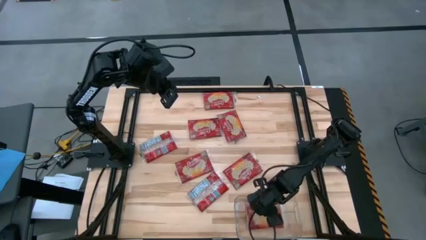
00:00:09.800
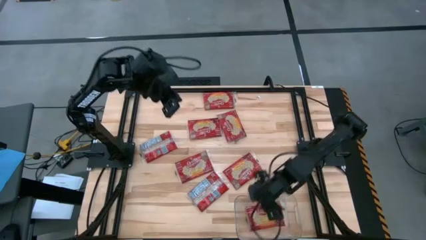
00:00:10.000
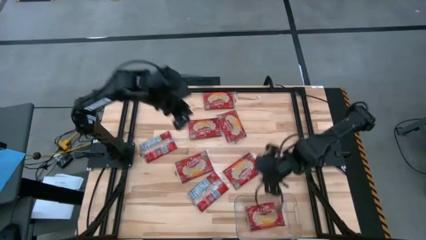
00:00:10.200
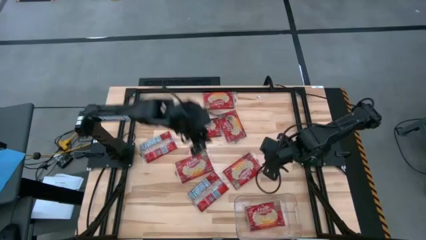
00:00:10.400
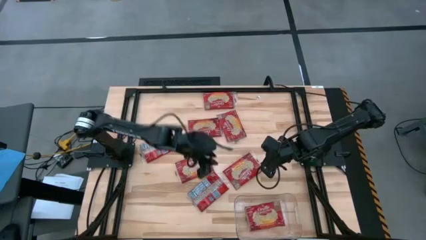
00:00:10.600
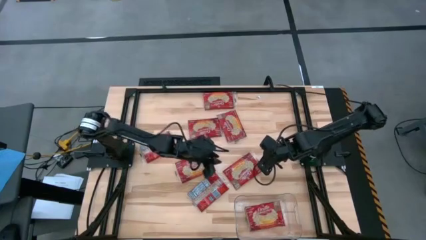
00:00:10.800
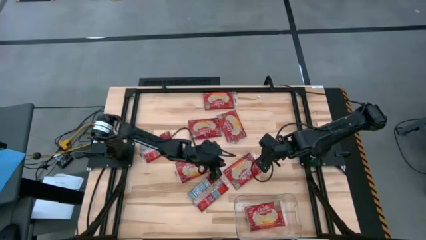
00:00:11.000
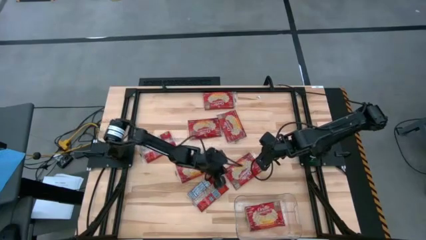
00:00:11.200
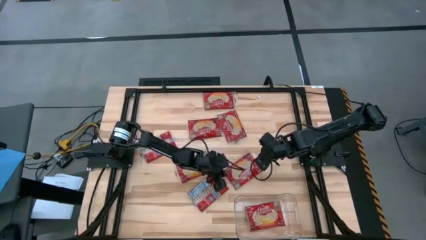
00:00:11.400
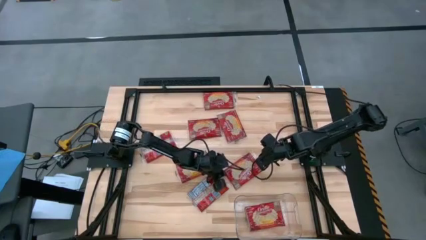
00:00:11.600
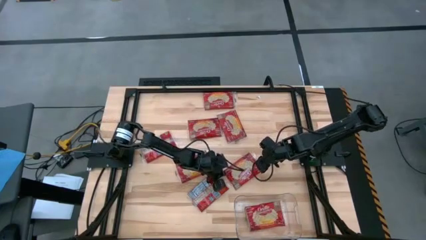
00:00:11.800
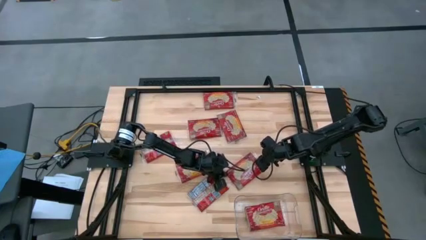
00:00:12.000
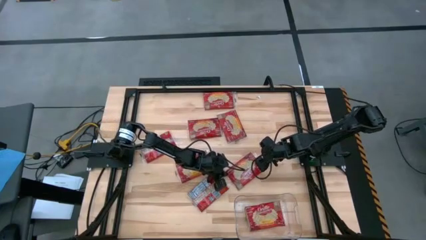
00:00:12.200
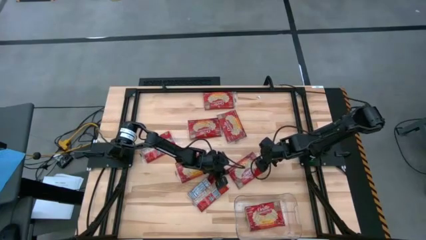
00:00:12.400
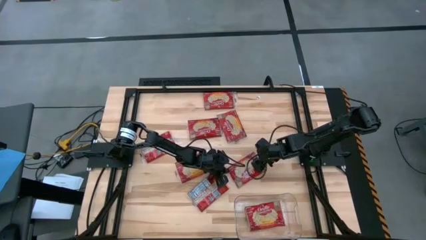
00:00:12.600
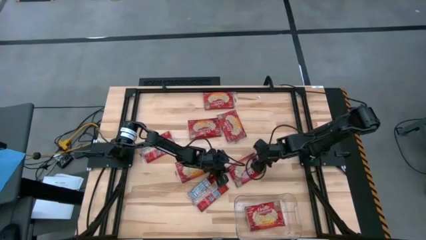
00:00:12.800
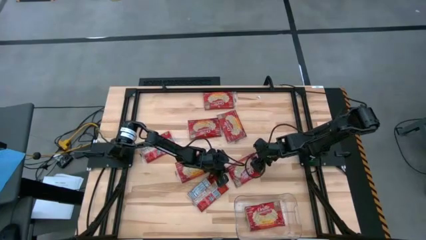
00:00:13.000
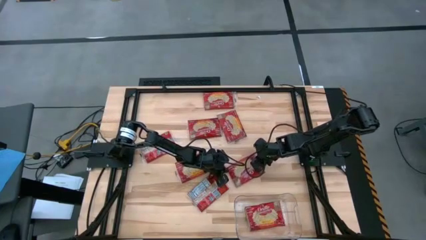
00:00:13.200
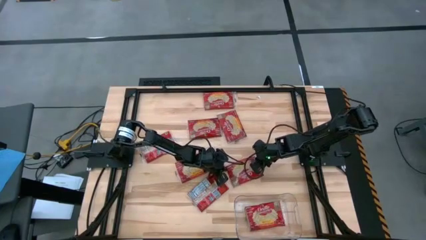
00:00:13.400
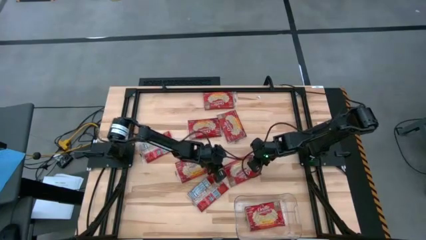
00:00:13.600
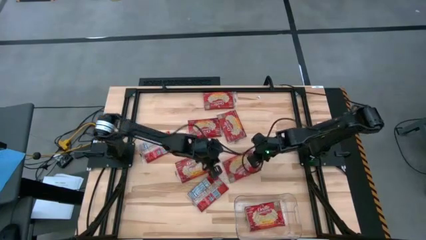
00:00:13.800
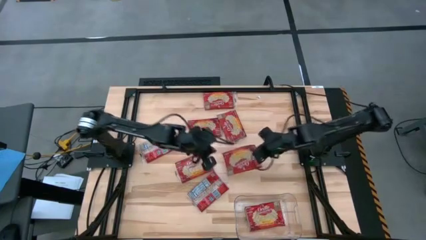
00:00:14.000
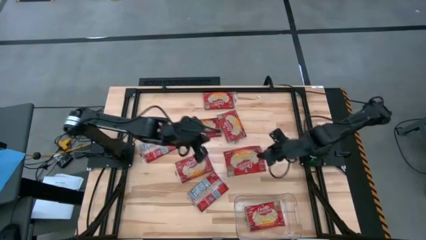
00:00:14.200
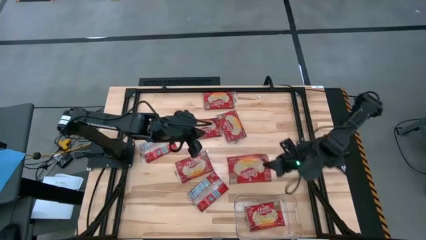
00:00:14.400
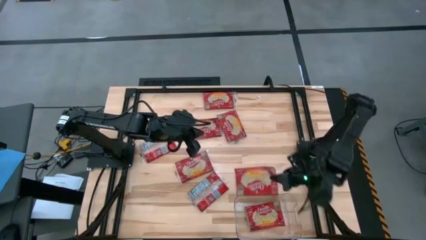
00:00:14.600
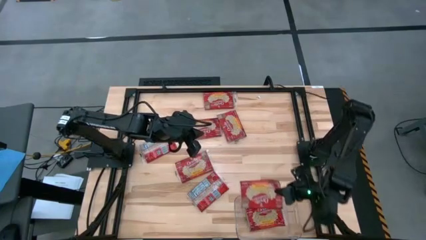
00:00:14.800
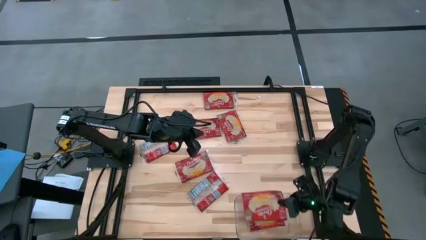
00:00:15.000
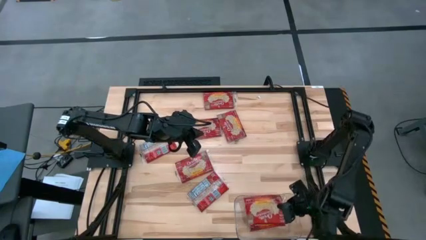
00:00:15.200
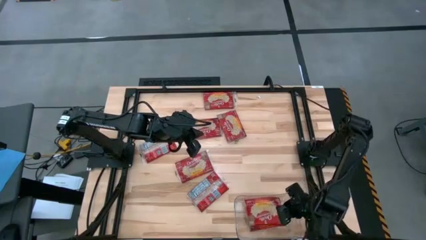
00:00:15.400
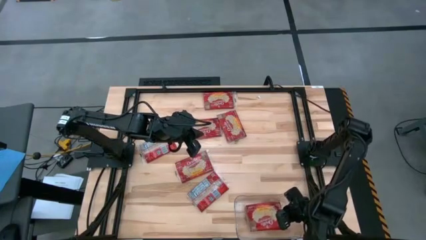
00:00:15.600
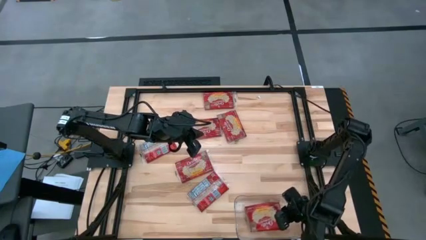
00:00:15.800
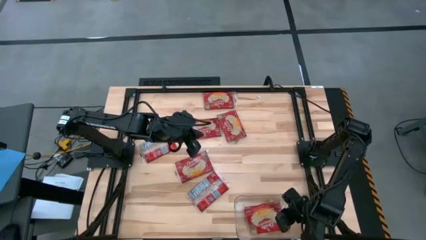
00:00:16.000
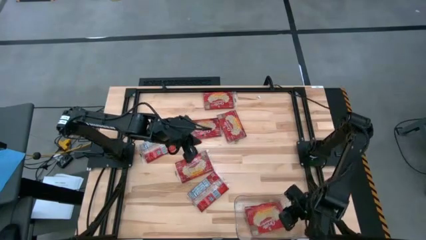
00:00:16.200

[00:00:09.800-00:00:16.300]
Task: Sort popcorn bags into baskets
Put the red popcorn bag into the transparent bin

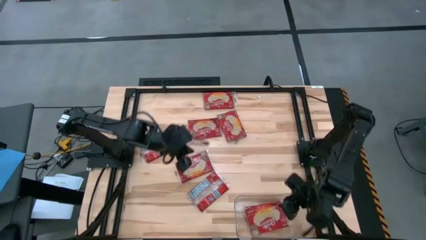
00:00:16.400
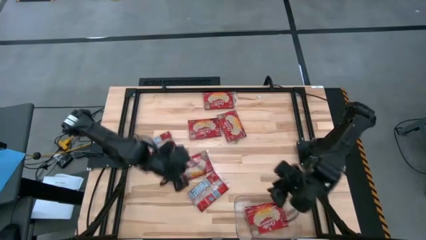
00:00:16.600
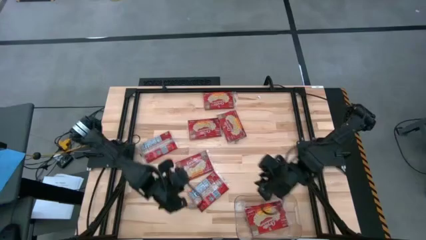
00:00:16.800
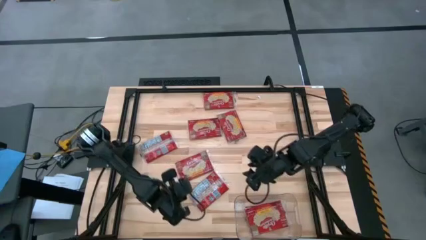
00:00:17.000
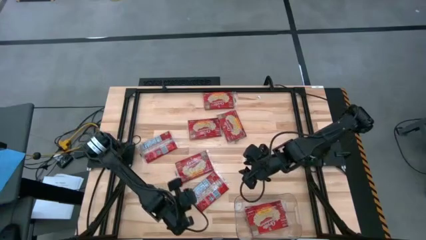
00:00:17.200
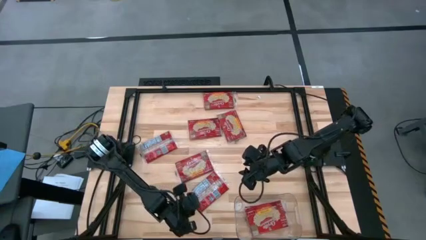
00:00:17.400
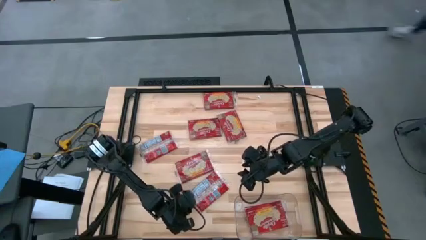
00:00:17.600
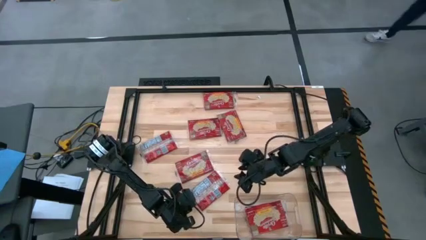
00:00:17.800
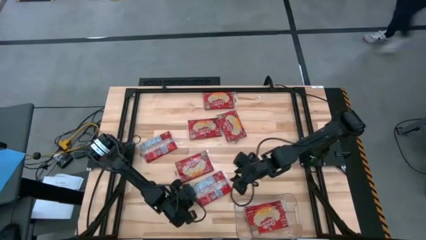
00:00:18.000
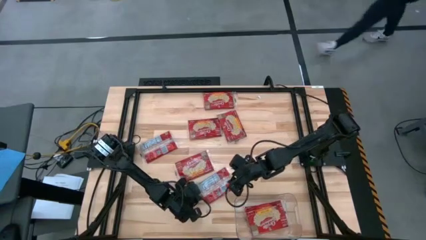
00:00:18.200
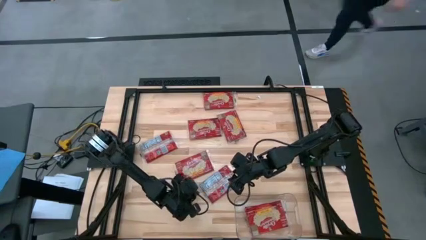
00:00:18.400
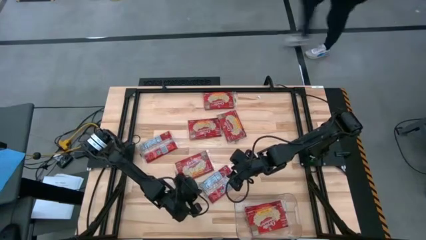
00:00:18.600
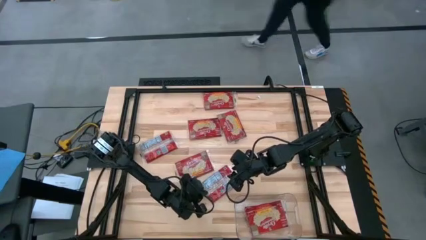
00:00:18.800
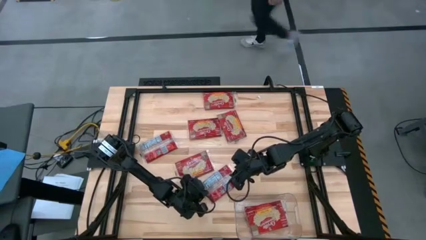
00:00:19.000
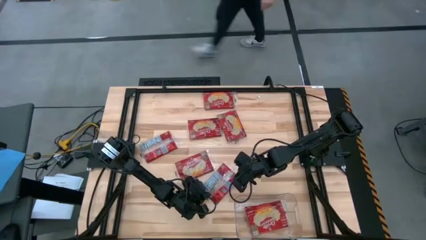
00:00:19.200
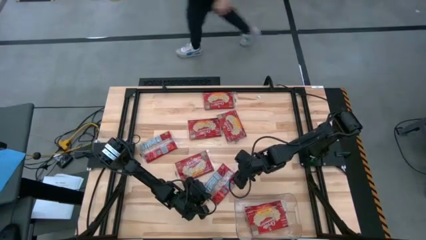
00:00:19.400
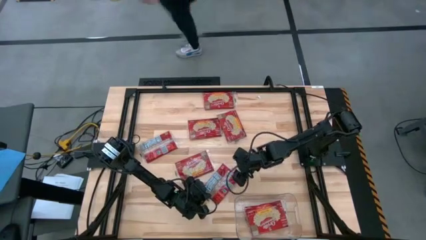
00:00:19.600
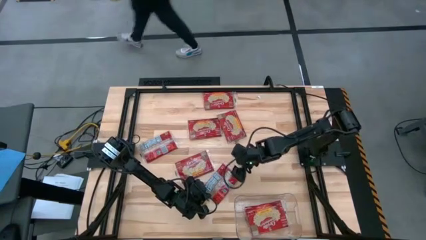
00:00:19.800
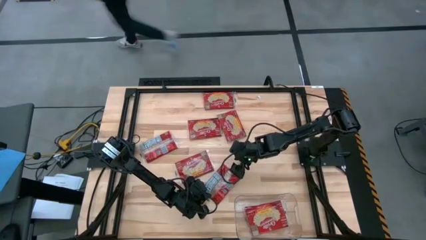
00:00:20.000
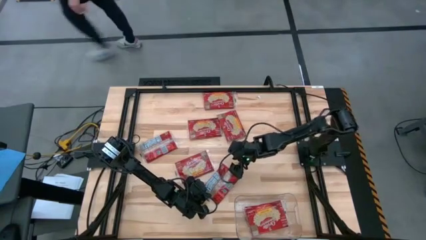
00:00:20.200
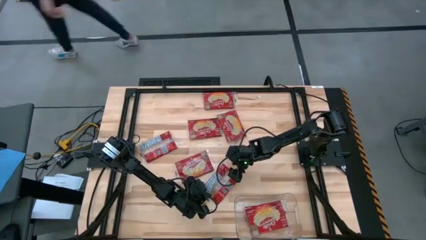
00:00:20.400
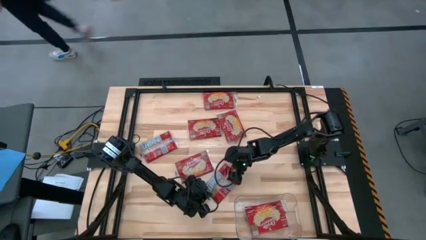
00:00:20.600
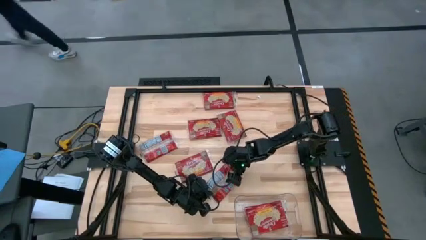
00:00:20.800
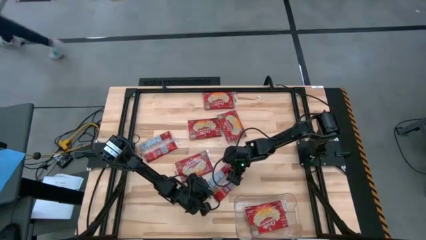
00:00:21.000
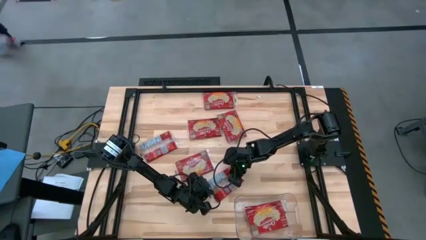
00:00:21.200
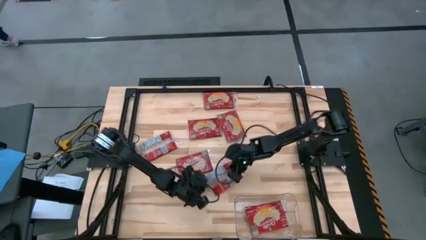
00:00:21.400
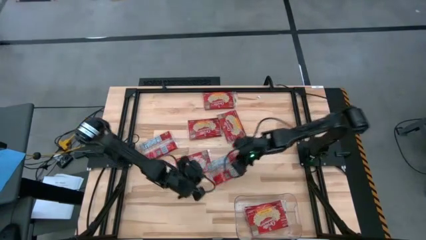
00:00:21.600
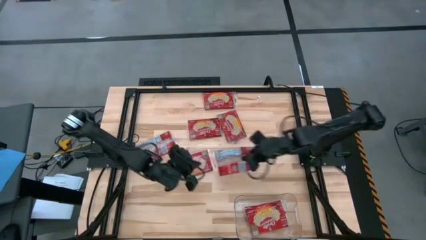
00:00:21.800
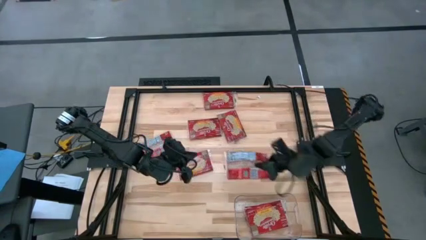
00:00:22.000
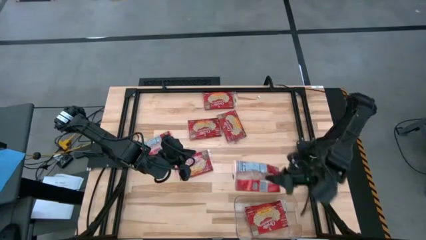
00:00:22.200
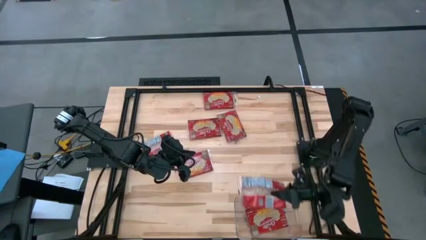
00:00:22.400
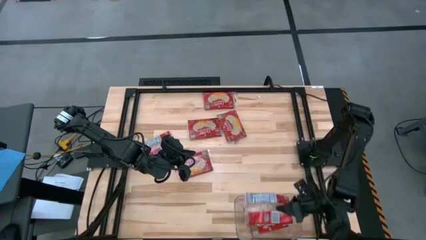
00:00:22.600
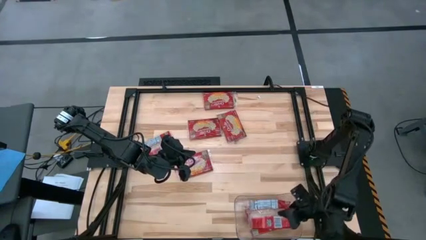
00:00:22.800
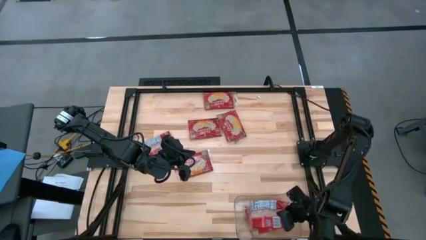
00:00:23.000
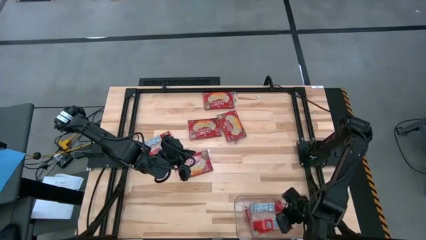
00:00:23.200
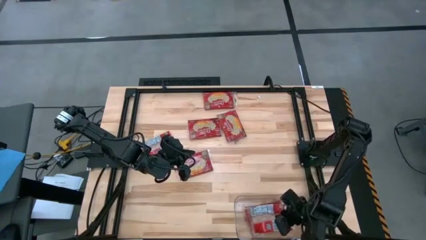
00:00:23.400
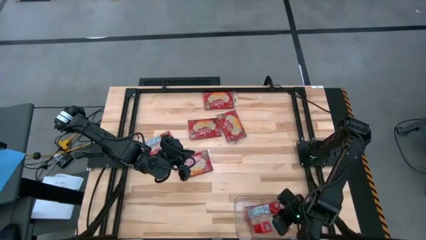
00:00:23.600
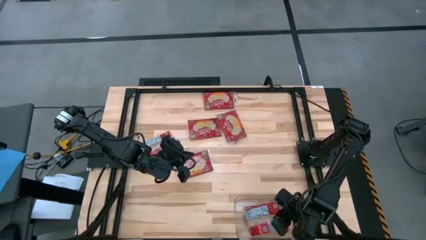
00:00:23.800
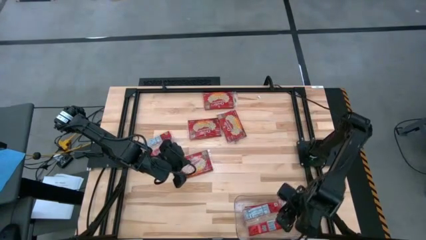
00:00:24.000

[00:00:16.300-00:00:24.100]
Put the red popcorn bag into the transparent bin

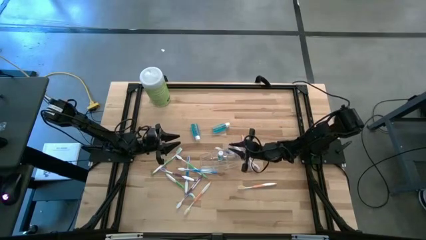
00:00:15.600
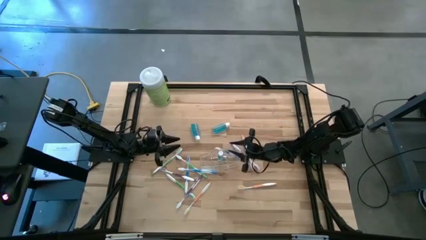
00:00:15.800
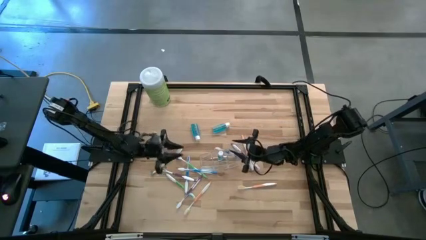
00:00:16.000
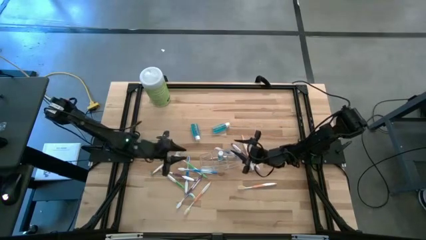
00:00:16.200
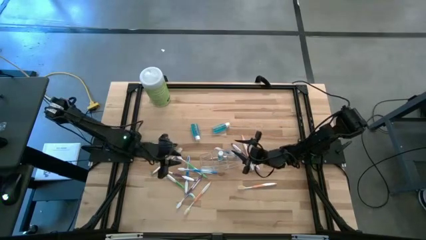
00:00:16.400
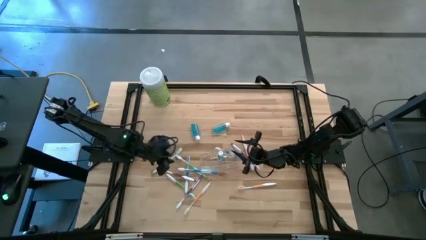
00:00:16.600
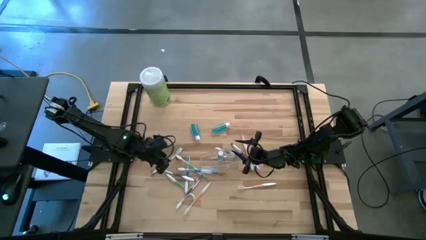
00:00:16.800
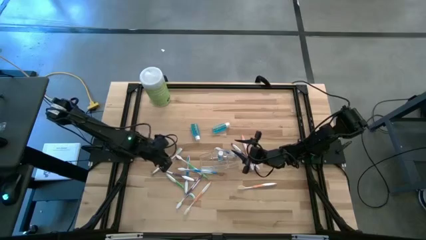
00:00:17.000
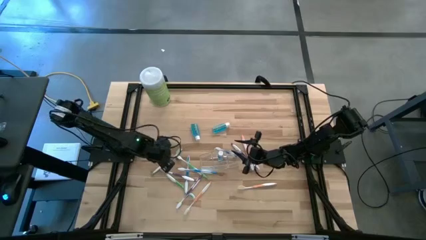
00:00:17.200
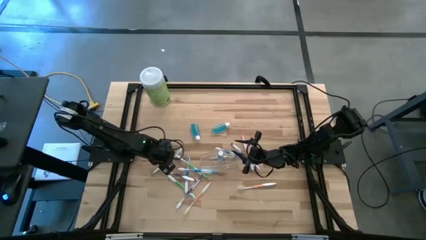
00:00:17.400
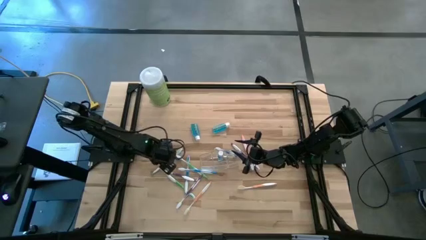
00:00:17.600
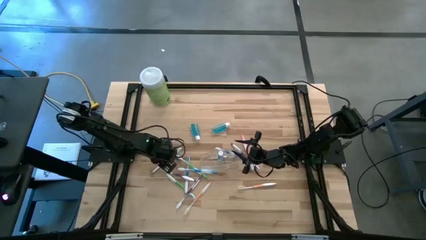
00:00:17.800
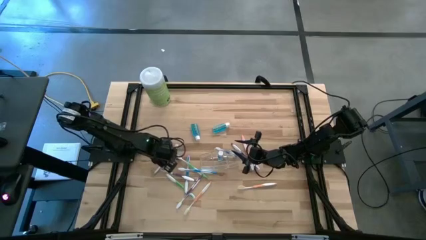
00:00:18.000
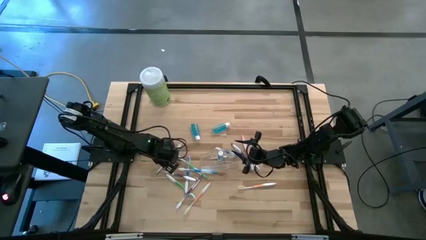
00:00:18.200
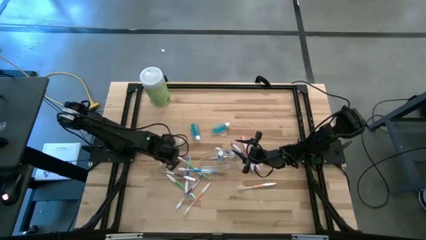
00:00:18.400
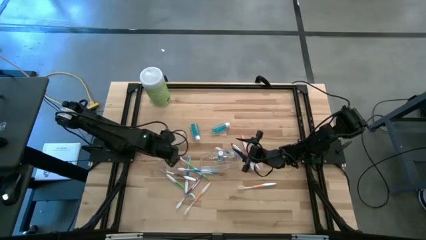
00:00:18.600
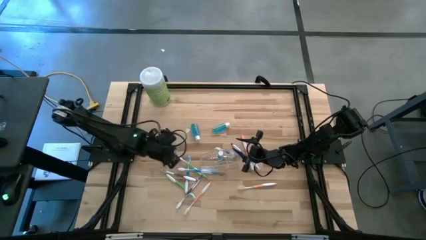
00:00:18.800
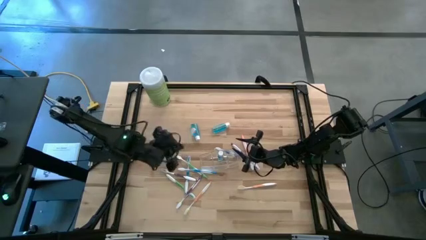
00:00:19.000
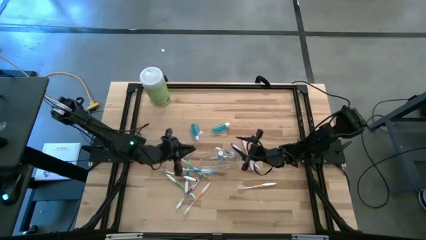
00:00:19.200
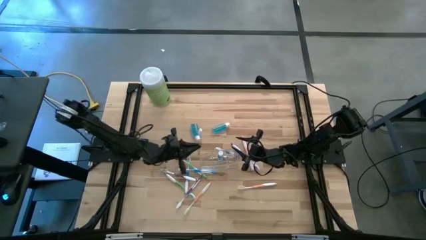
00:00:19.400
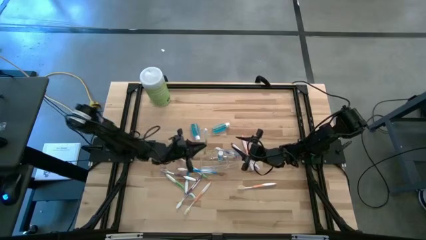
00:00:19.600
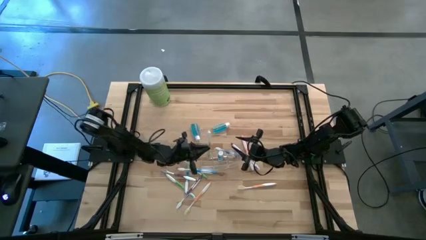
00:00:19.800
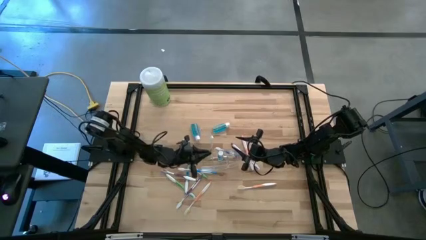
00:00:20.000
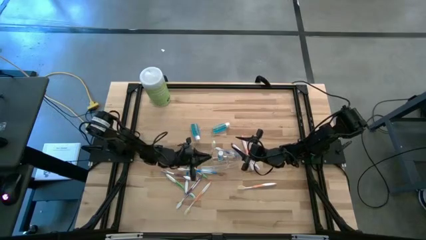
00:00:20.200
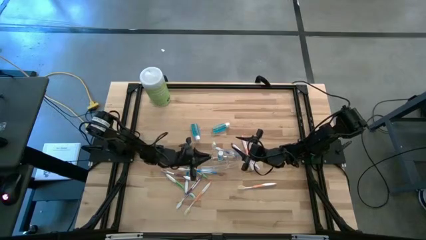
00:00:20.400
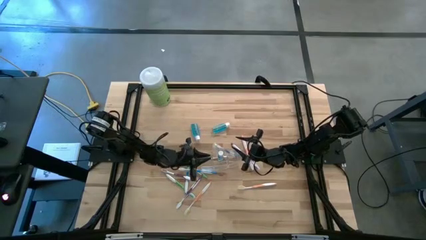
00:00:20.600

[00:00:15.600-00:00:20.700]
Task: Pick & Place toothbrushing station
Put the top green toothbrush into the transparent organizer
